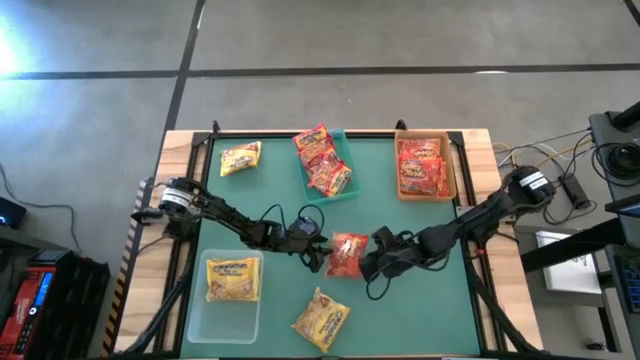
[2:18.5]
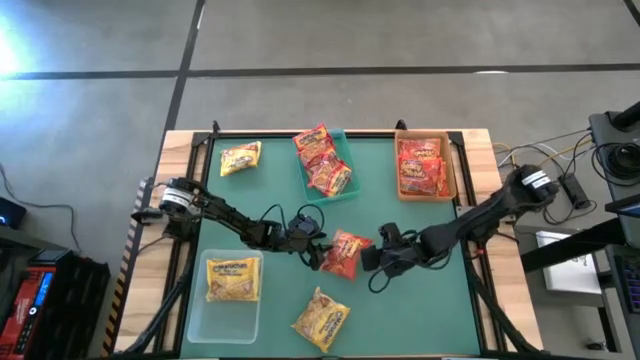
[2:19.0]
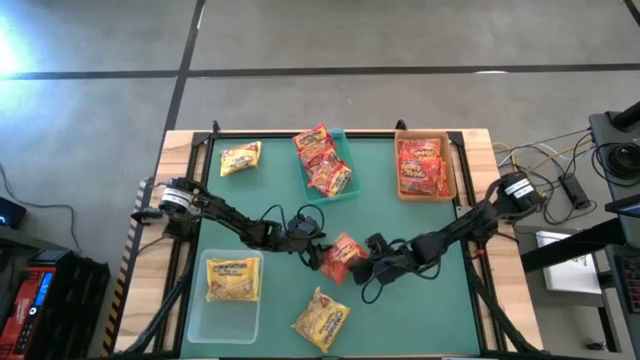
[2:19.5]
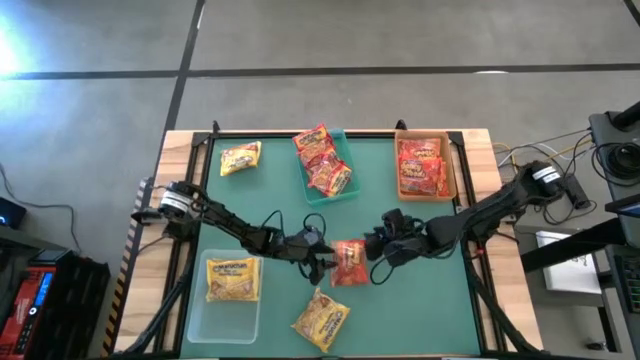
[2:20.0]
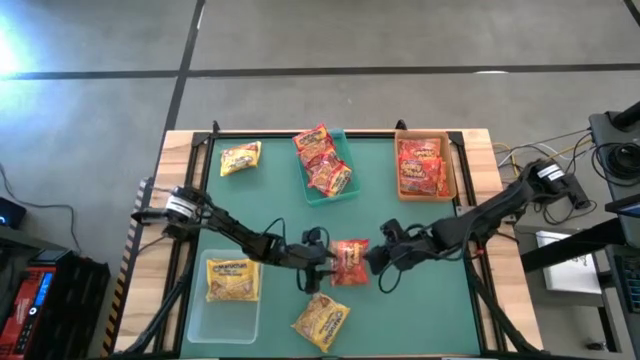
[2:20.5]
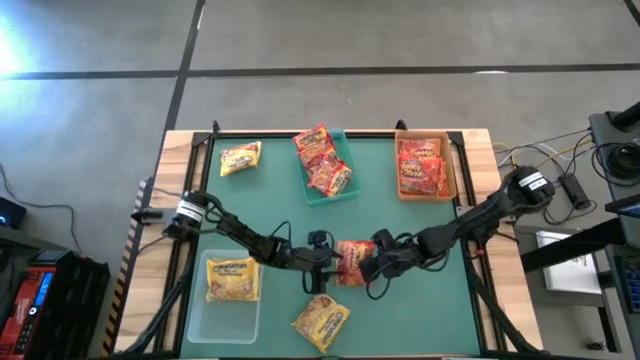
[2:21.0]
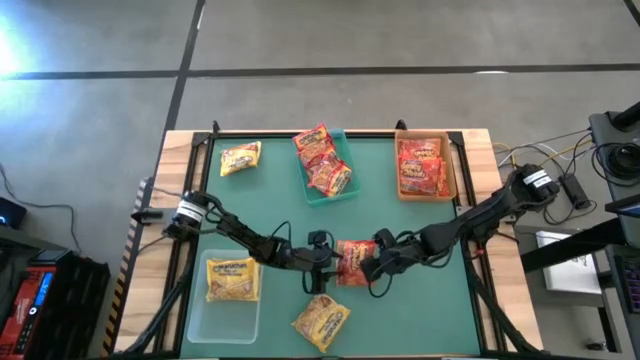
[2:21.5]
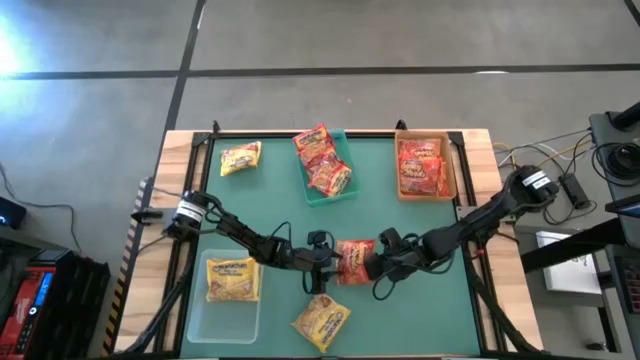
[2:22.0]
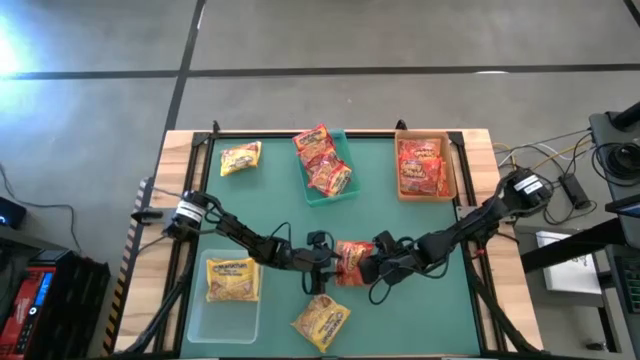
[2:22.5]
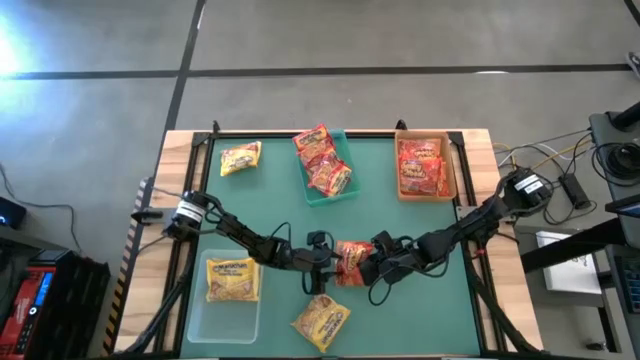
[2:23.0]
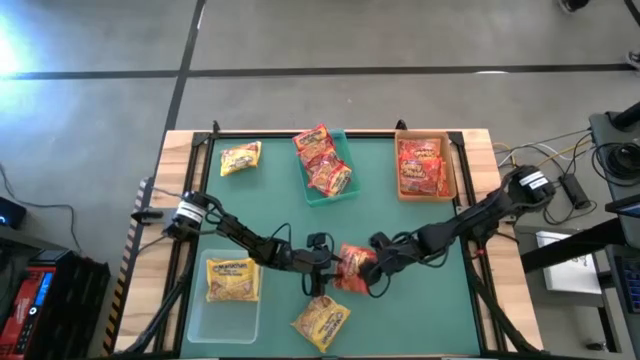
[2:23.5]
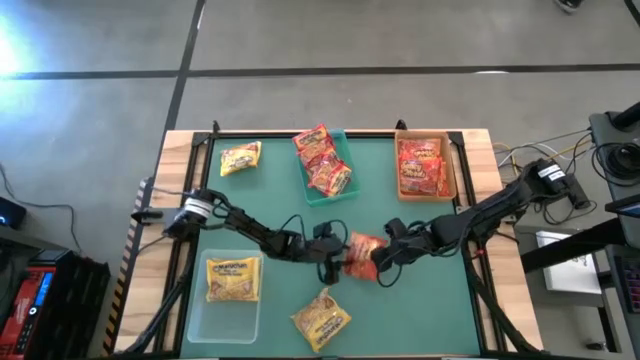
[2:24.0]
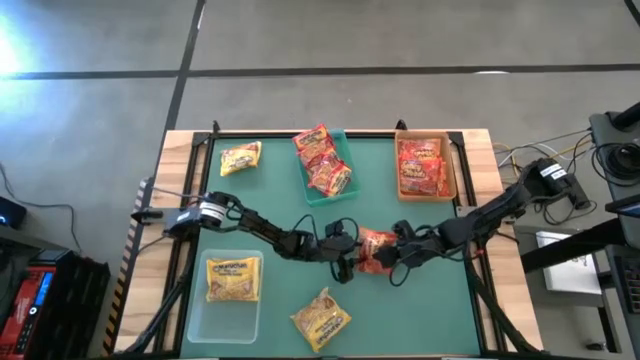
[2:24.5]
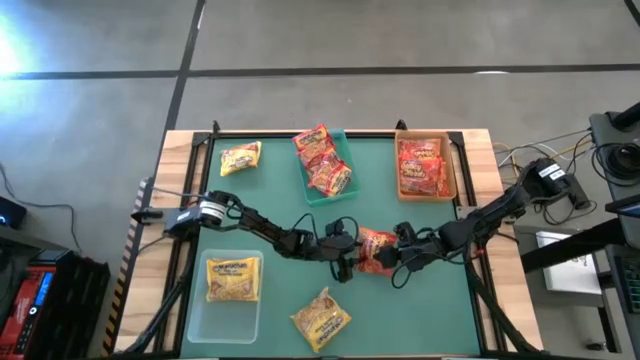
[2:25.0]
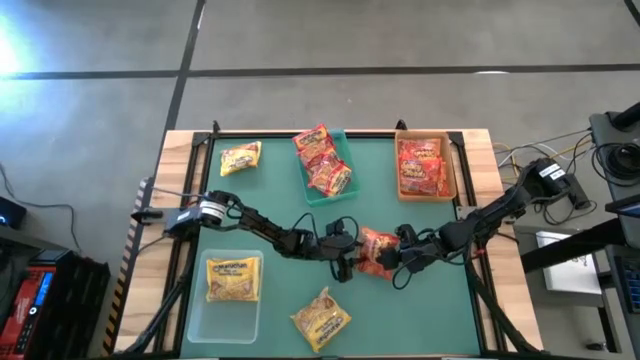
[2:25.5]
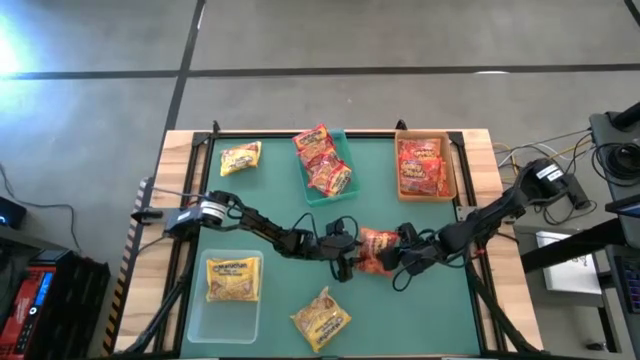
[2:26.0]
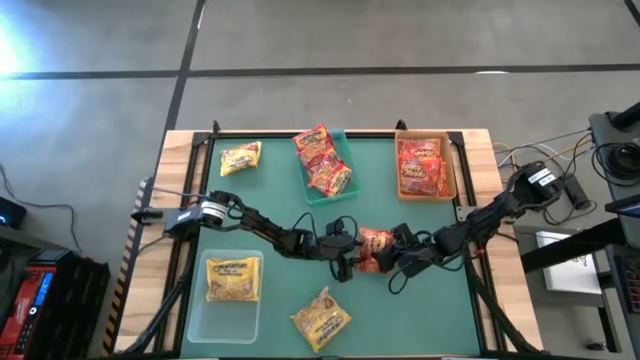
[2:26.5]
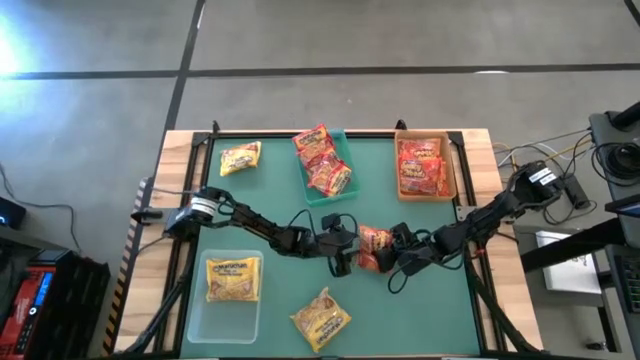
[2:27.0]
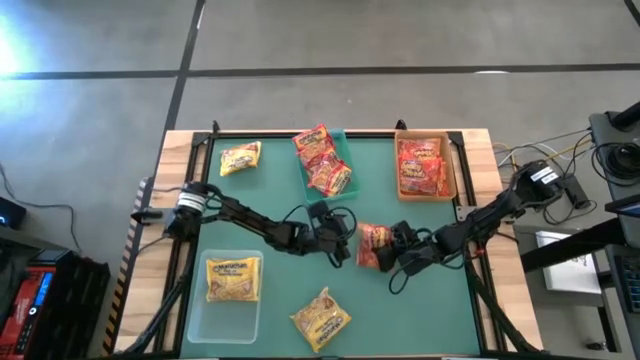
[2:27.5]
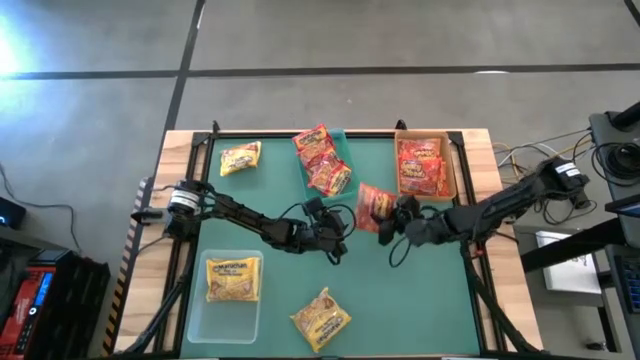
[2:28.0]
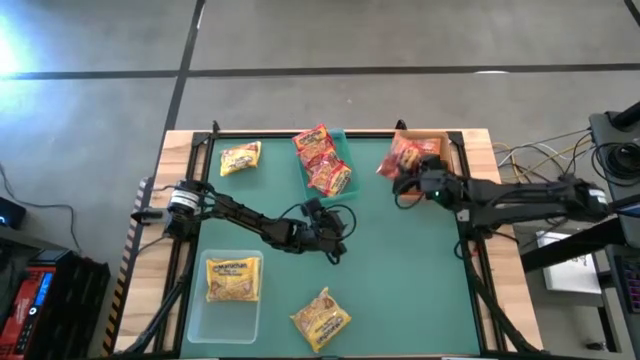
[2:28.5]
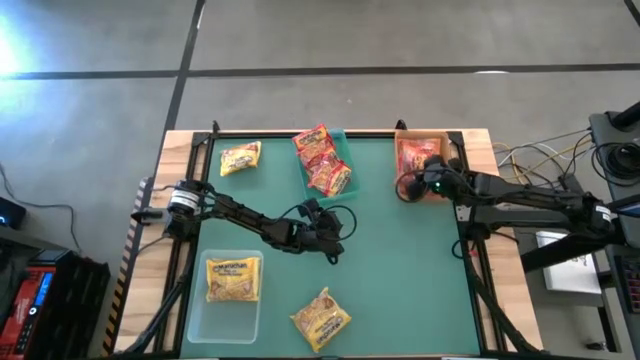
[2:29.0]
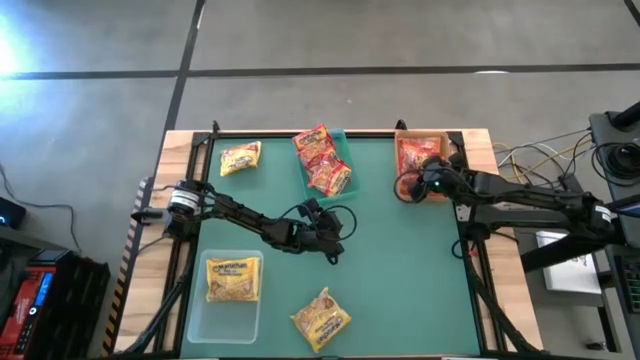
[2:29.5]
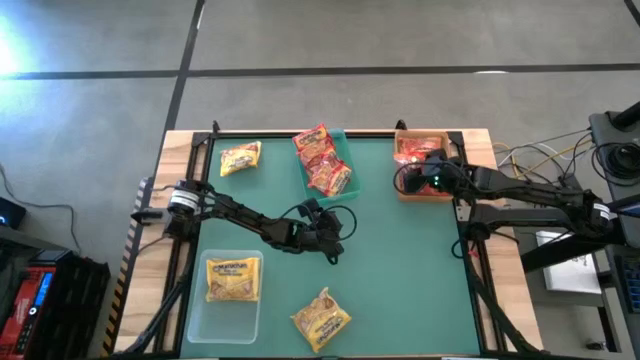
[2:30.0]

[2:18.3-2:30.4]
Task: Sort Maruchan noodles
Put the orange noodle pack into the orange bin

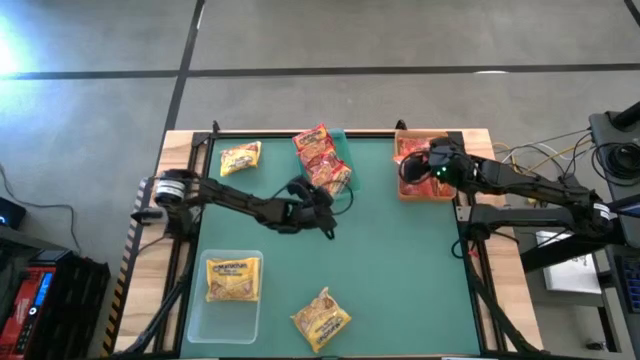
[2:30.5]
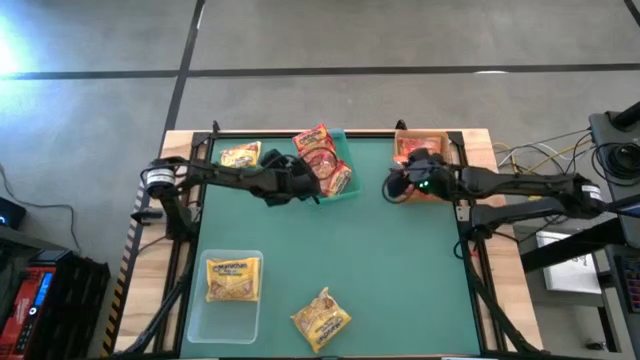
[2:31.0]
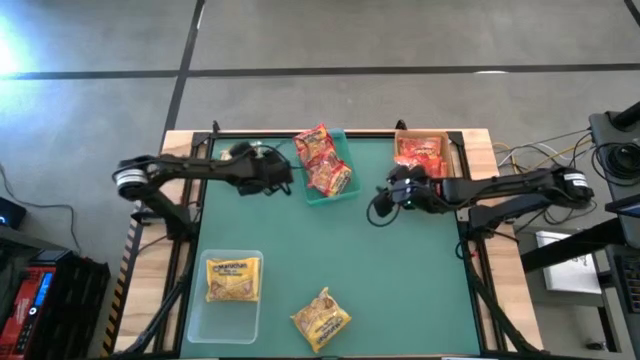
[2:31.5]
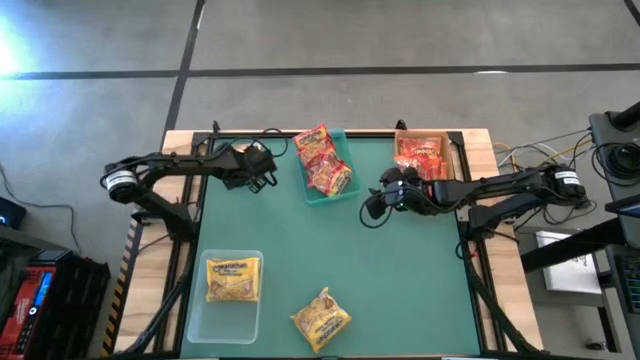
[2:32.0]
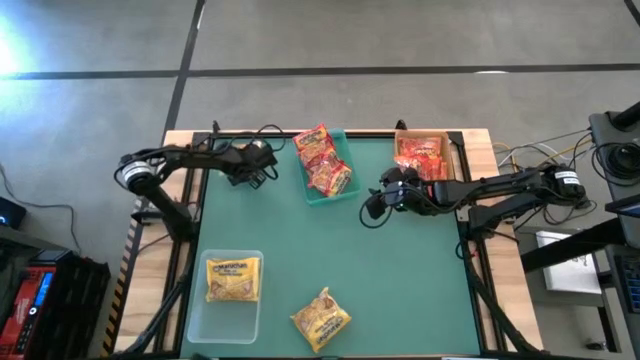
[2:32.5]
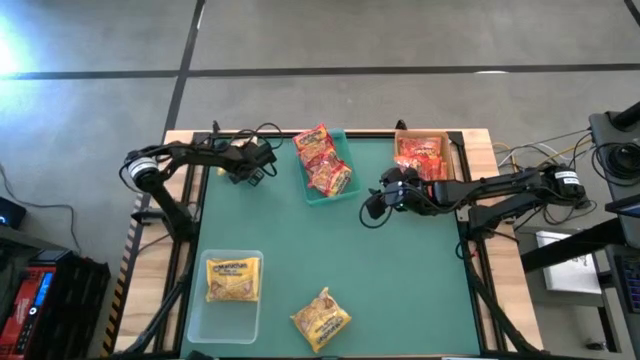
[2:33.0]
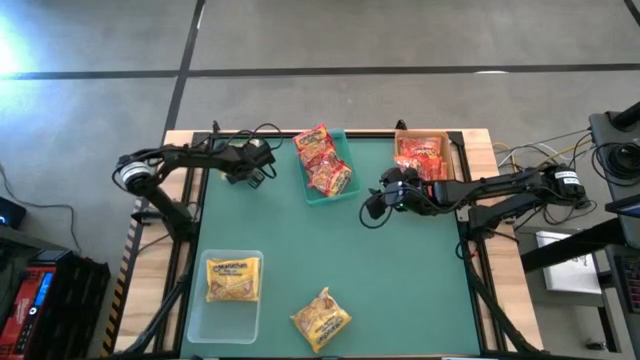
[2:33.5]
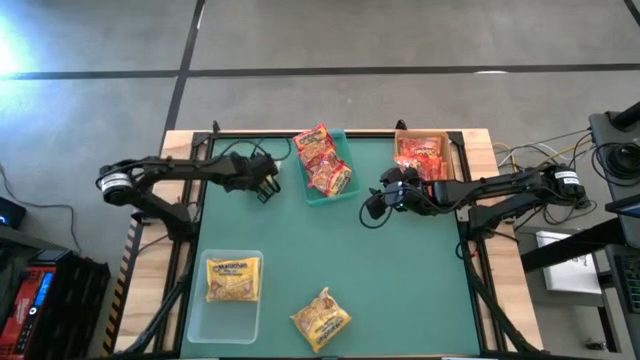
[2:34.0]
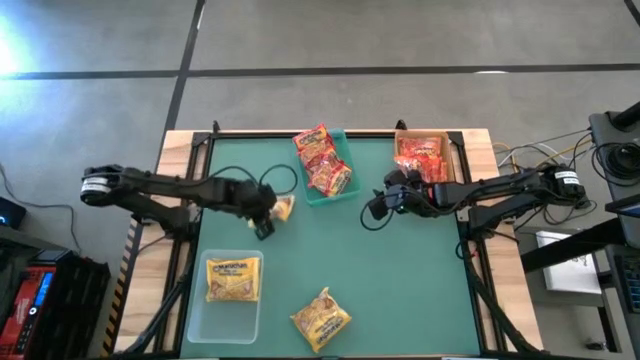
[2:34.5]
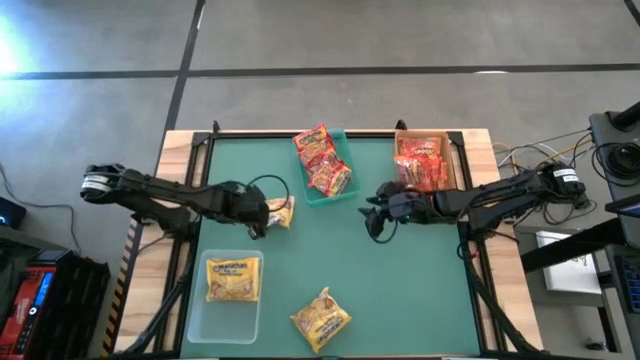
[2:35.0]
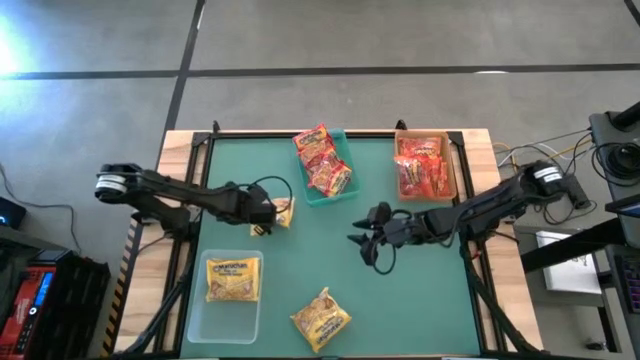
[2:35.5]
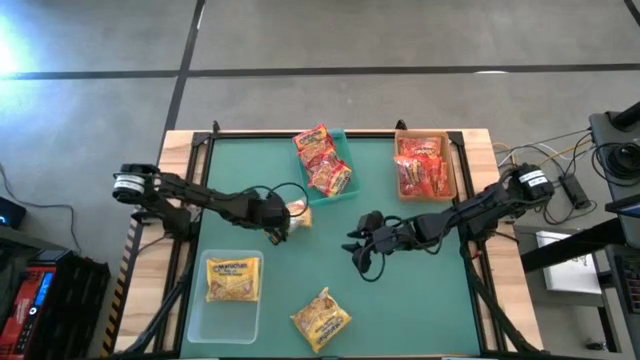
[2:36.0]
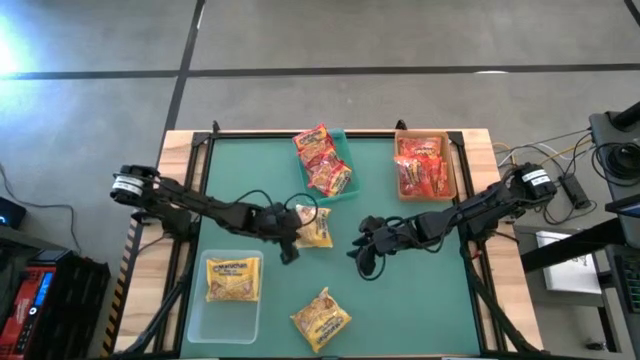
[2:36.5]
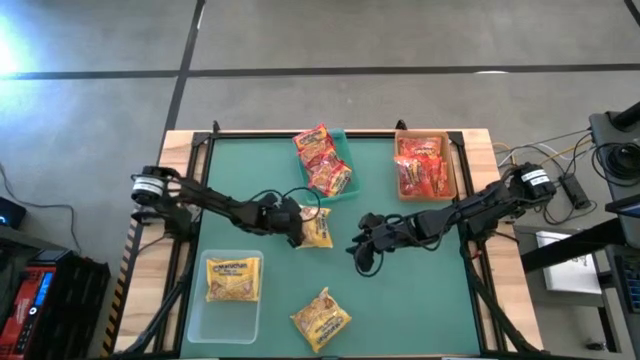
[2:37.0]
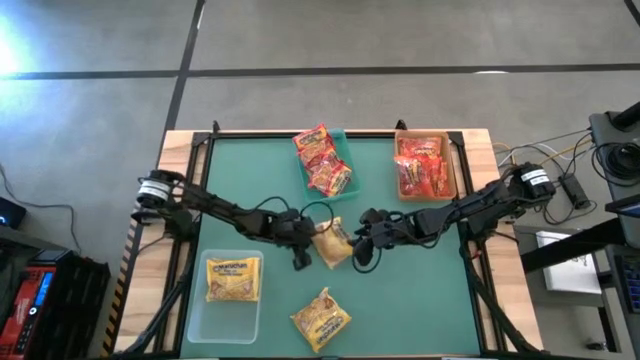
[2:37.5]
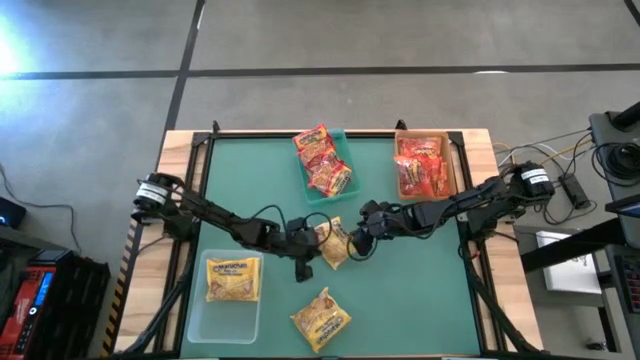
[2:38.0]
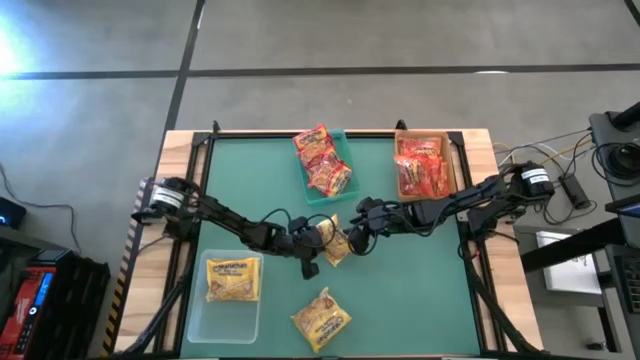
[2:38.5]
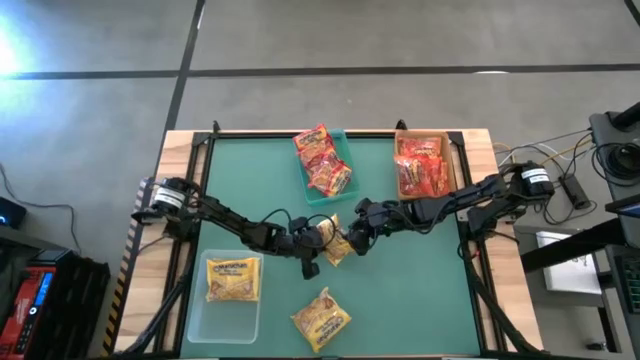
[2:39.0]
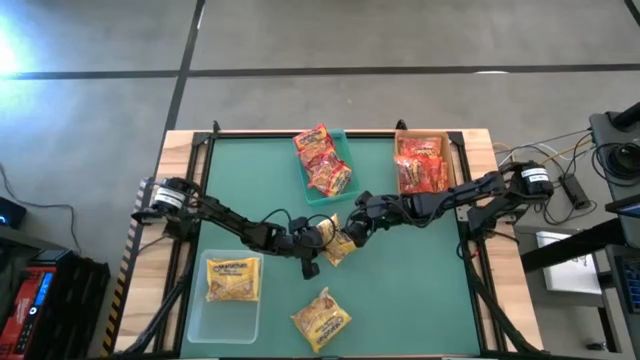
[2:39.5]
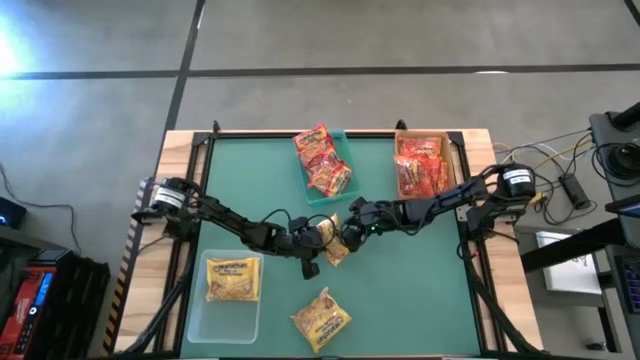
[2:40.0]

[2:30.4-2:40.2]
Put the top yellow noddle pack into the transparent bin
